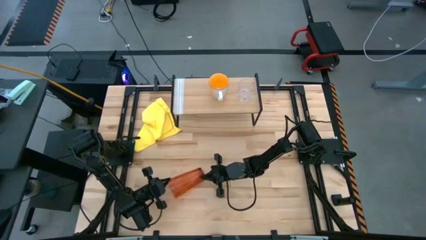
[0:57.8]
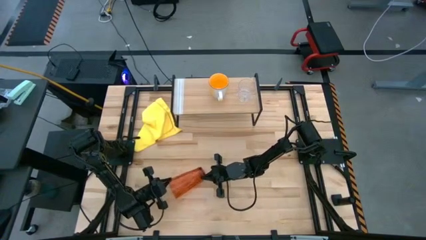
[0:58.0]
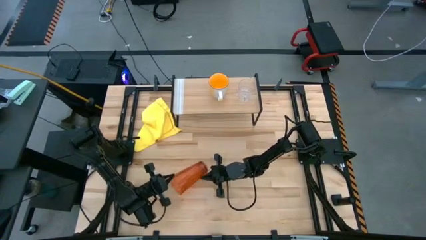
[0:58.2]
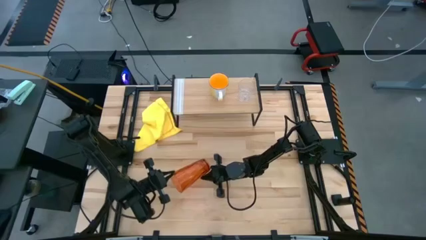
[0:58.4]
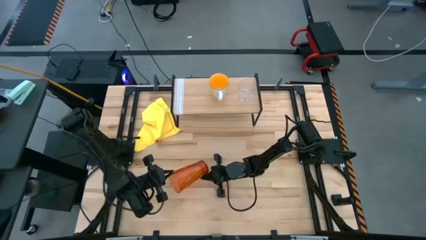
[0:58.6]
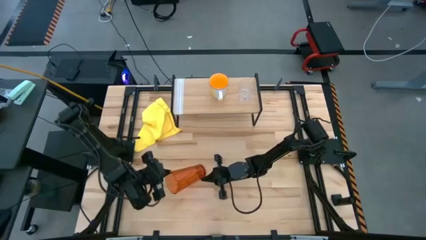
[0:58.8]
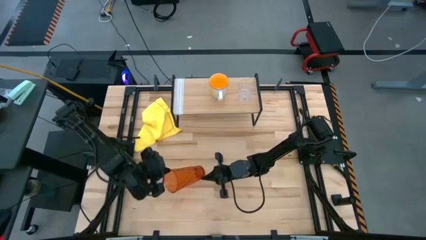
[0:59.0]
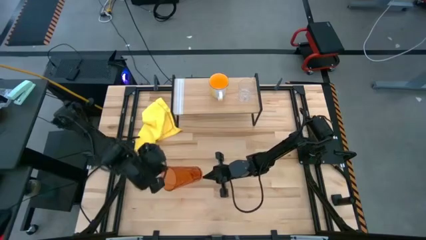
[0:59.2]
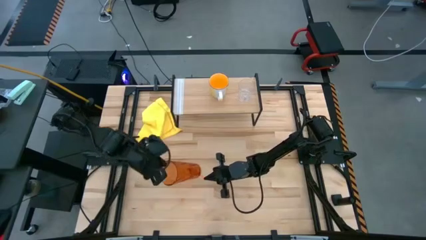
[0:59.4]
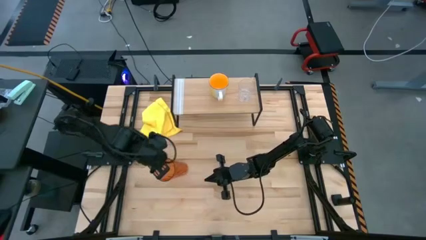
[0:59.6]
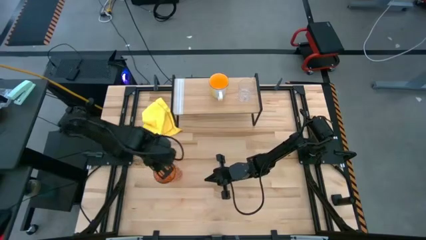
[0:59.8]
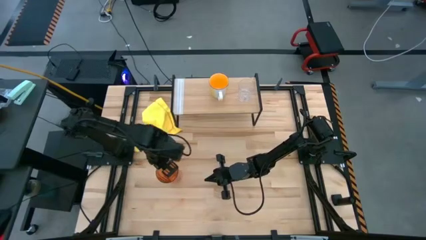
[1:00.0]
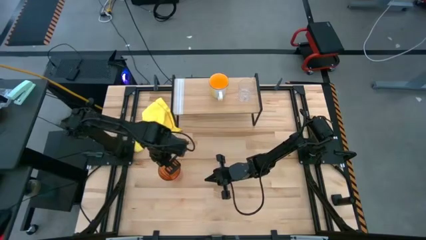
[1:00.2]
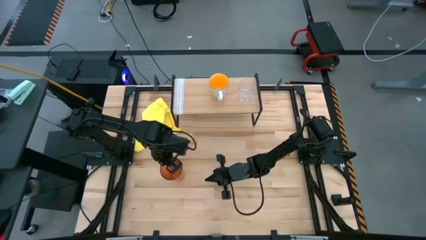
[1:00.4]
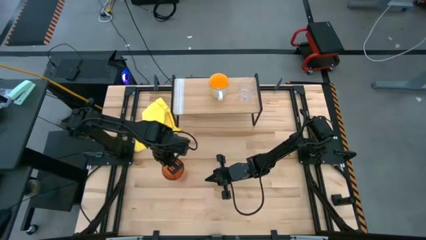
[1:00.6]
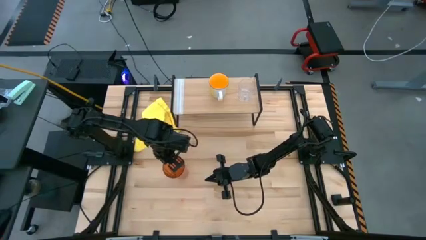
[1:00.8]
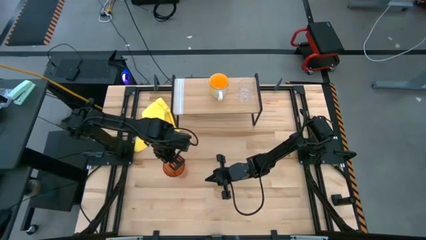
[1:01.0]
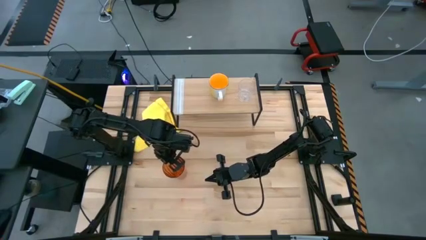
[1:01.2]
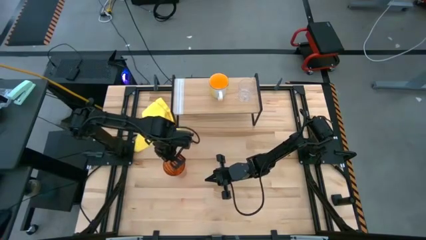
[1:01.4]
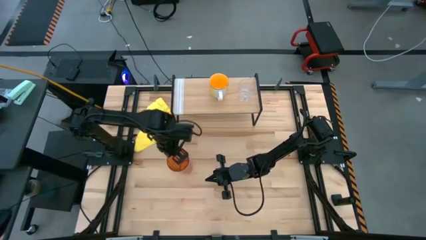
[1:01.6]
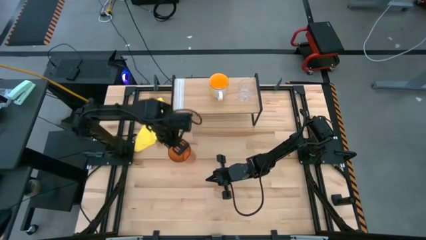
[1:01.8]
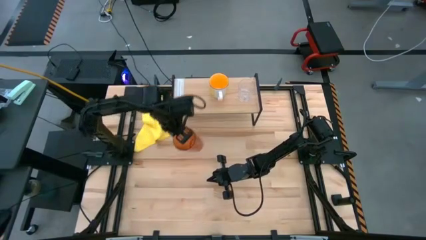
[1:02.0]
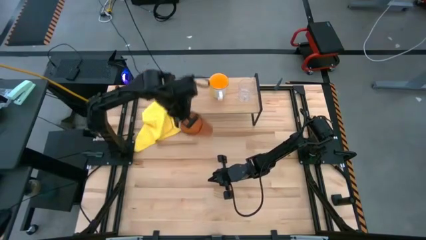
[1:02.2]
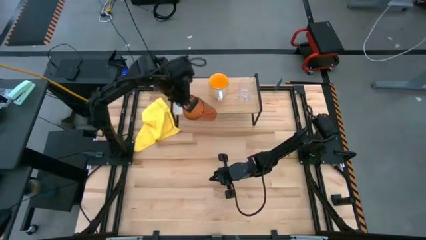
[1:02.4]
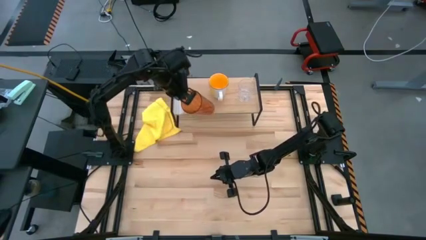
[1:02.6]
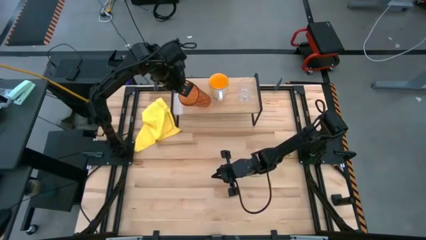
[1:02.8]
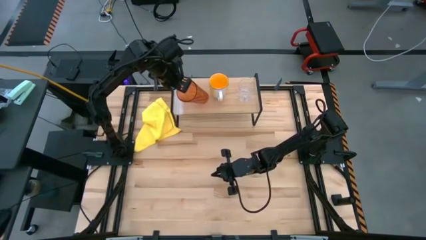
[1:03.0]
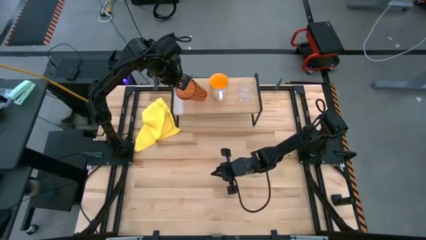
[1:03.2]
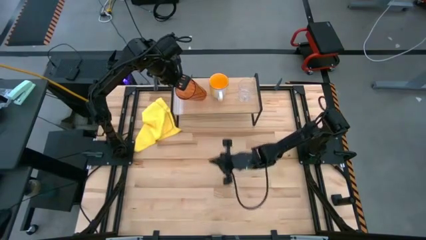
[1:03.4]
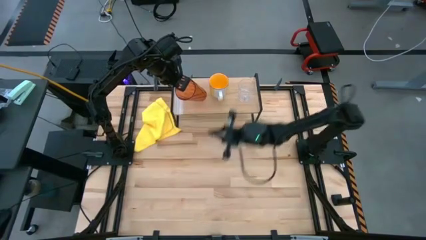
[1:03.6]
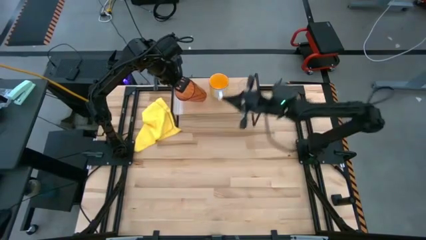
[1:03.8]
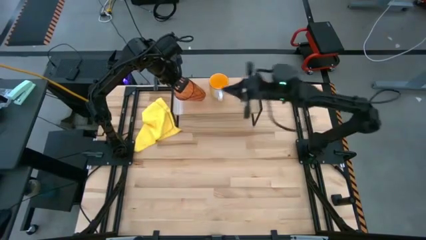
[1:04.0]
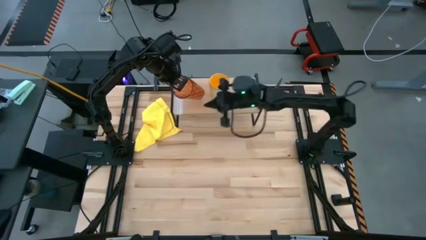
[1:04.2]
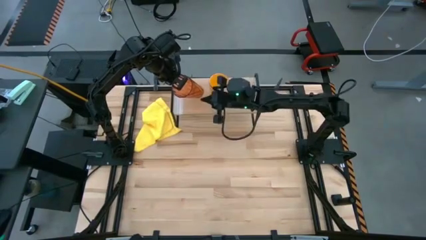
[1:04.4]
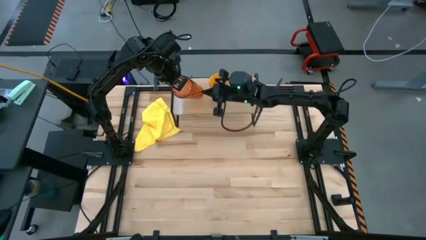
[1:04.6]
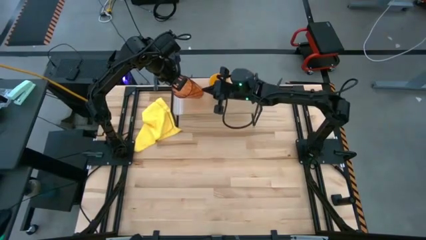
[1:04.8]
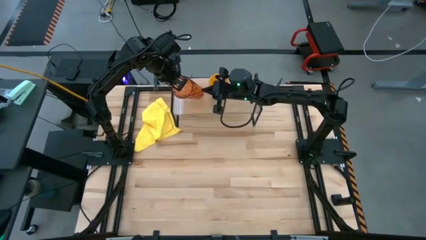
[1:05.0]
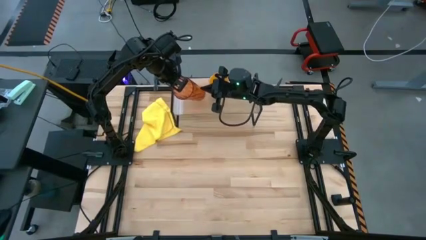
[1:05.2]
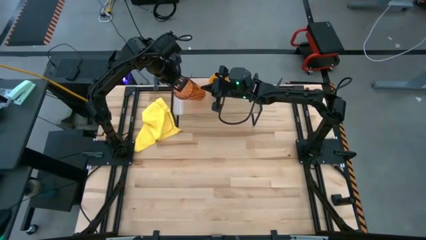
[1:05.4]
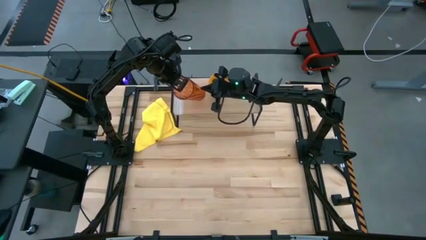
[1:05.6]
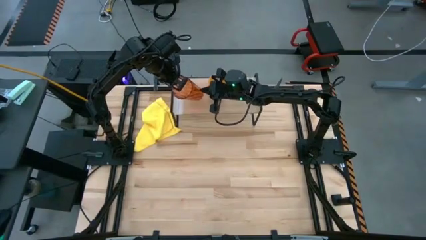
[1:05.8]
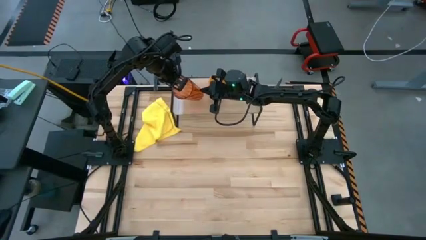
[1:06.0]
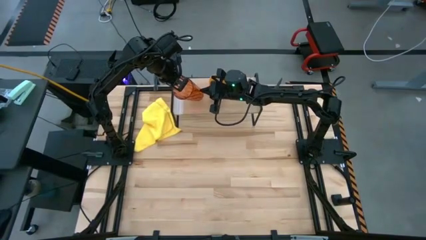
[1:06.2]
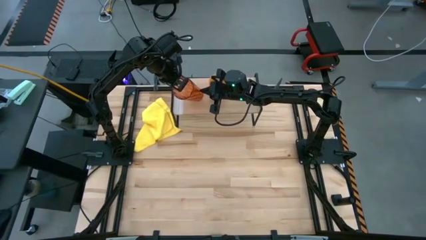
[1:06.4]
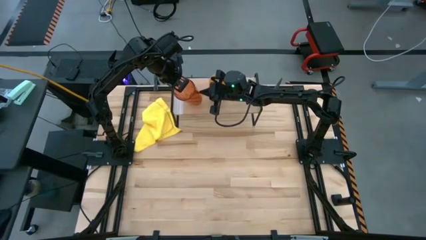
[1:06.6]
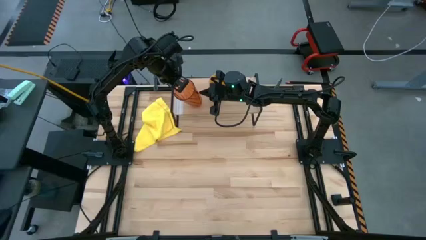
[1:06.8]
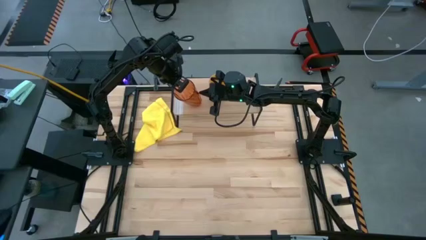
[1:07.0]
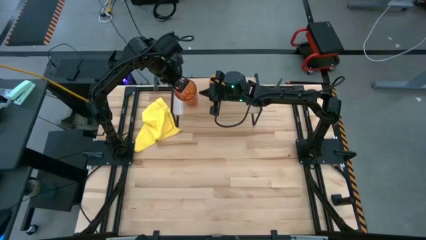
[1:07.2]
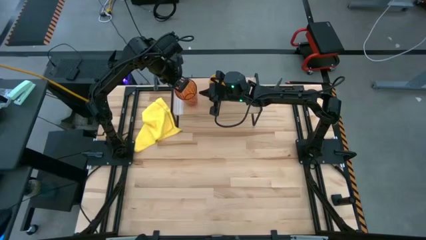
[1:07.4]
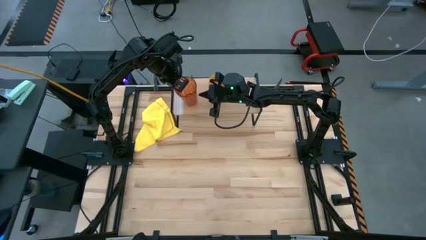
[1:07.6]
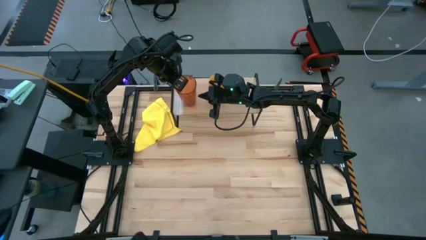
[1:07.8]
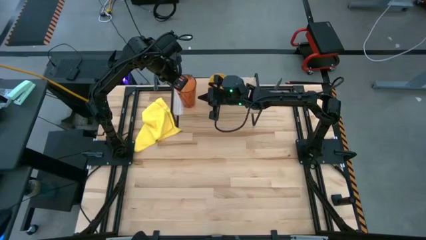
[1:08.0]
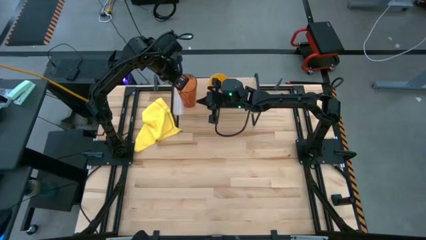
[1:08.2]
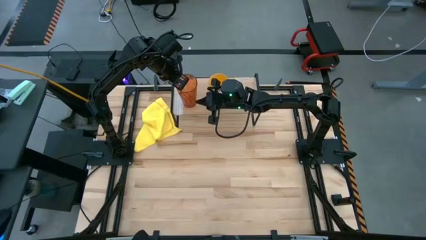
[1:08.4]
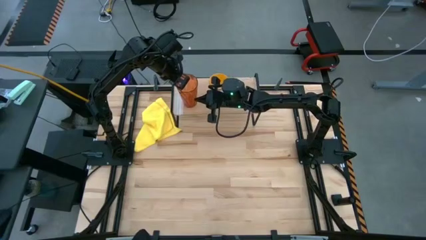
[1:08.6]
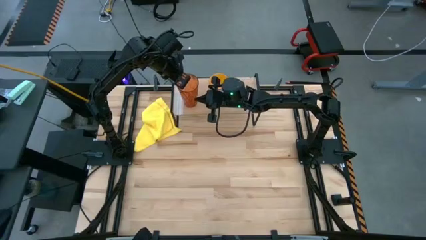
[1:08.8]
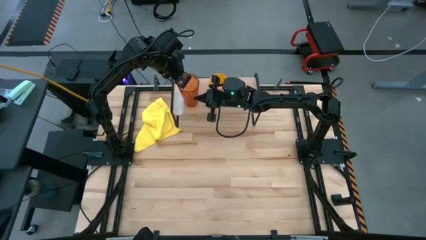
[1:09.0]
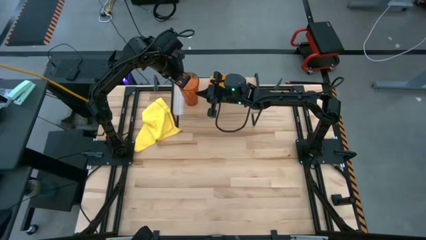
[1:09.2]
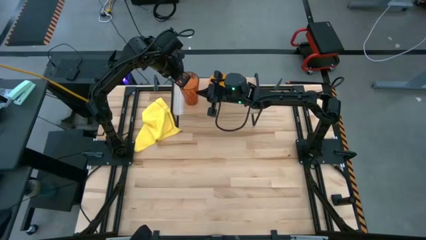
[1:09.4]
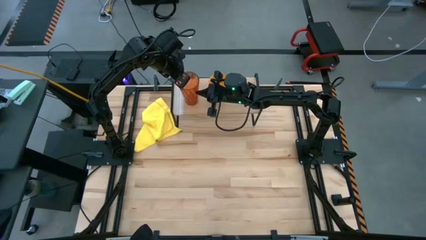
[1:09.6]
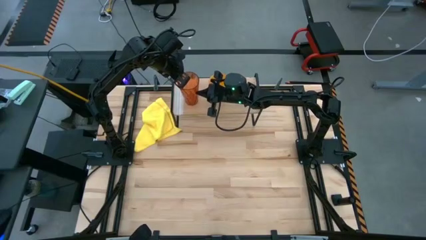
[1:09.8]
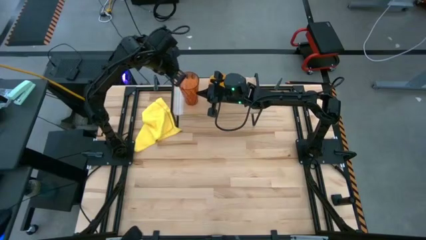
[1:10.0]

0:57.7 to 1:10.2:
Task: Stack small to large cups/mugs on shelf
Put the orange cup on the shelf
